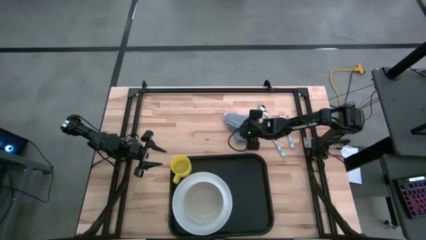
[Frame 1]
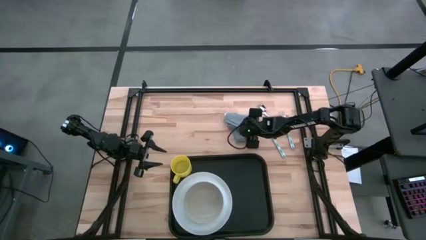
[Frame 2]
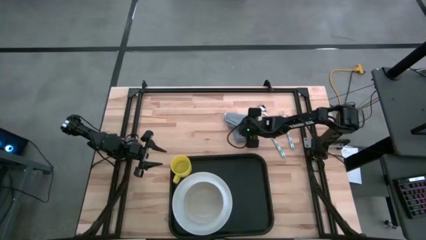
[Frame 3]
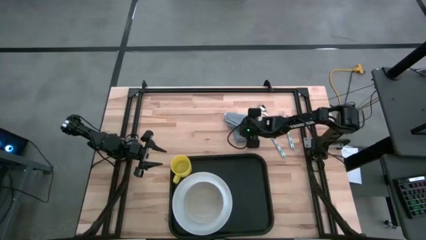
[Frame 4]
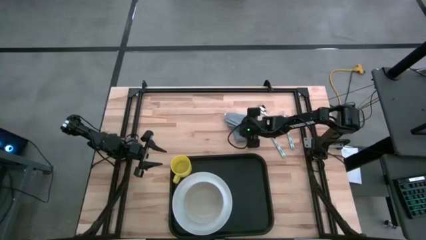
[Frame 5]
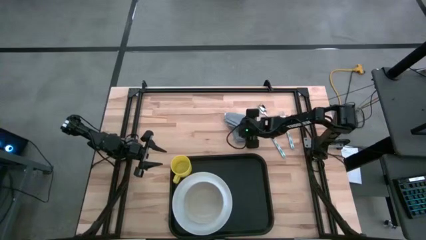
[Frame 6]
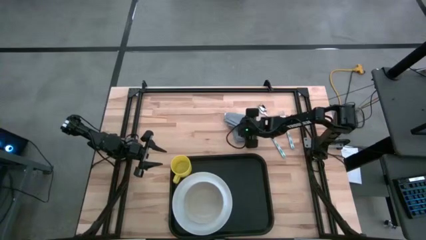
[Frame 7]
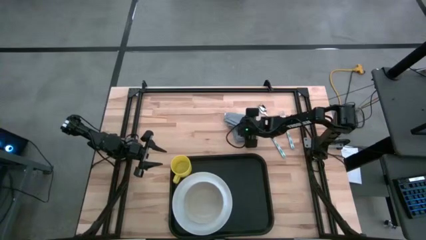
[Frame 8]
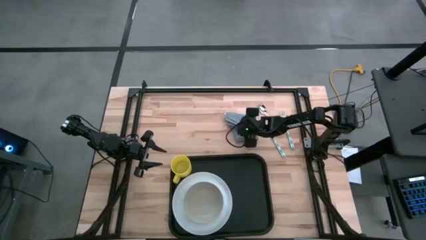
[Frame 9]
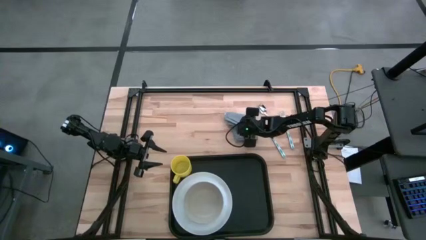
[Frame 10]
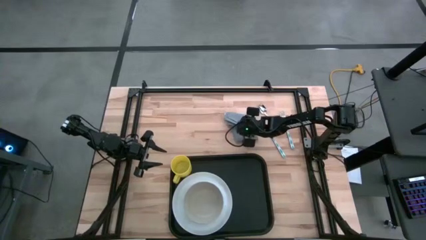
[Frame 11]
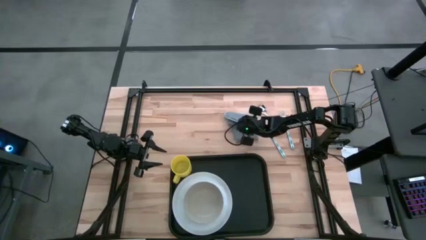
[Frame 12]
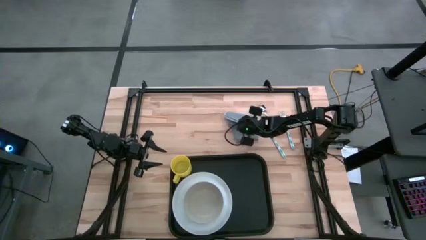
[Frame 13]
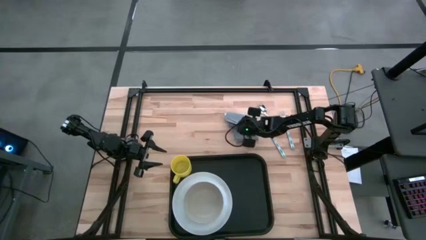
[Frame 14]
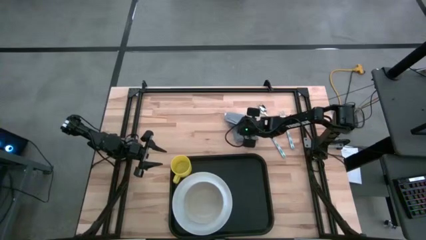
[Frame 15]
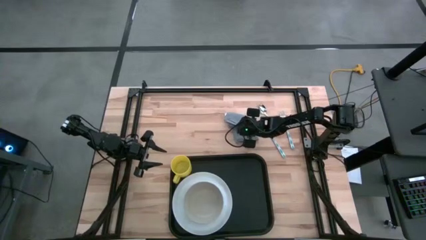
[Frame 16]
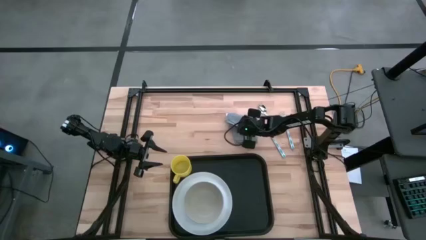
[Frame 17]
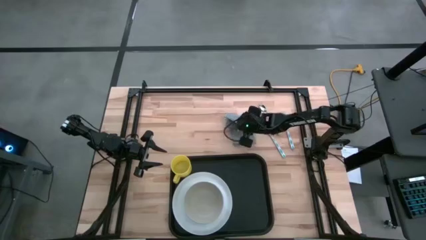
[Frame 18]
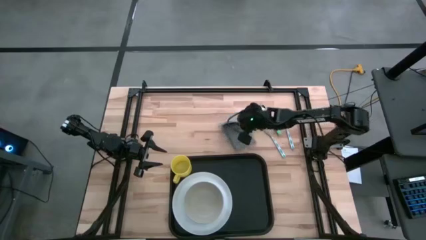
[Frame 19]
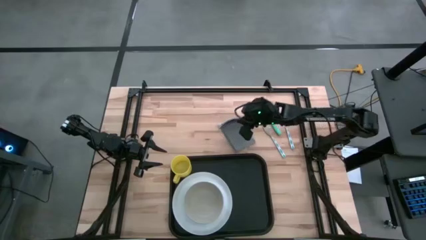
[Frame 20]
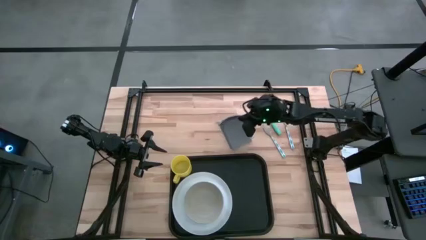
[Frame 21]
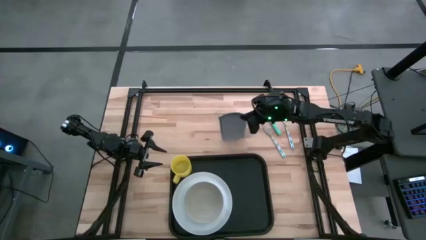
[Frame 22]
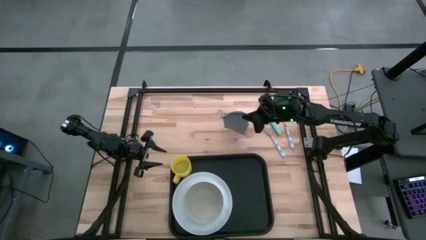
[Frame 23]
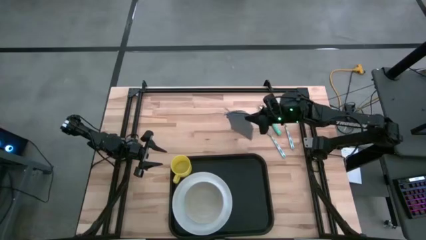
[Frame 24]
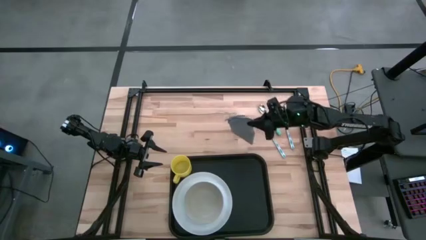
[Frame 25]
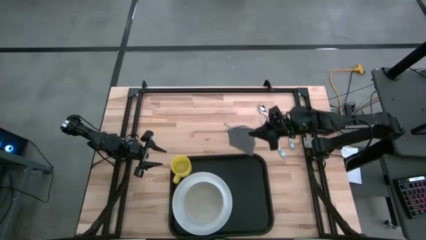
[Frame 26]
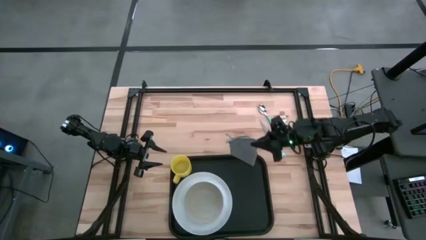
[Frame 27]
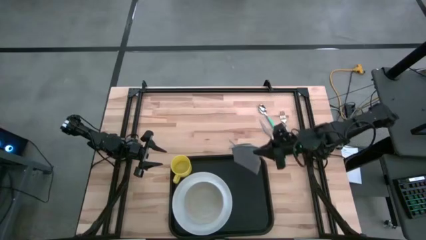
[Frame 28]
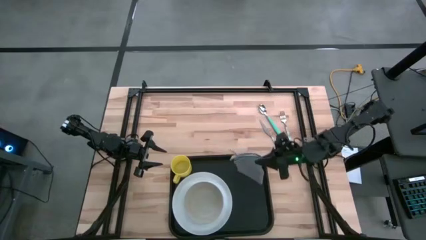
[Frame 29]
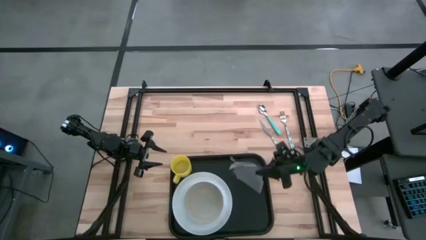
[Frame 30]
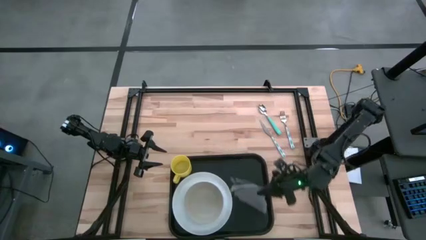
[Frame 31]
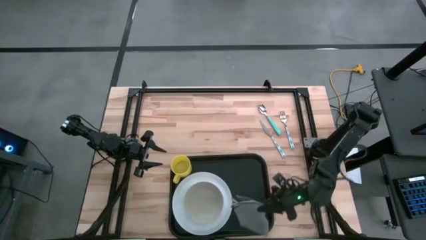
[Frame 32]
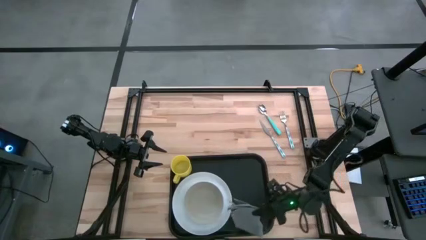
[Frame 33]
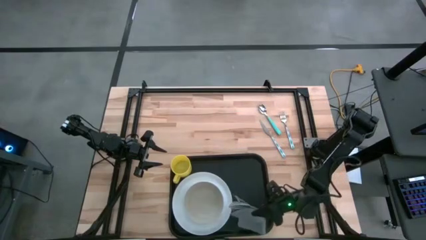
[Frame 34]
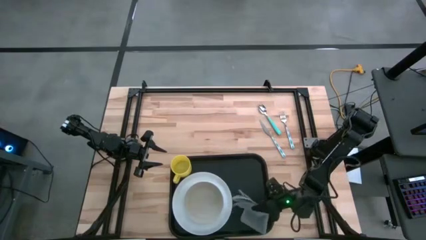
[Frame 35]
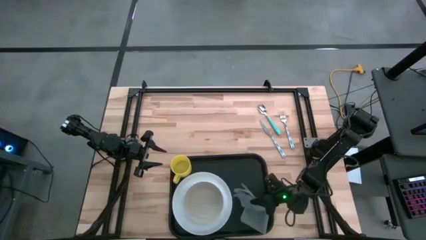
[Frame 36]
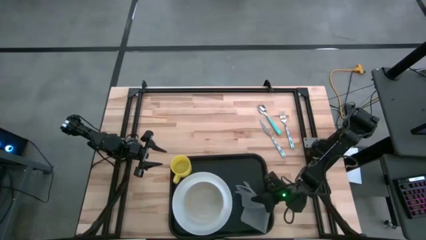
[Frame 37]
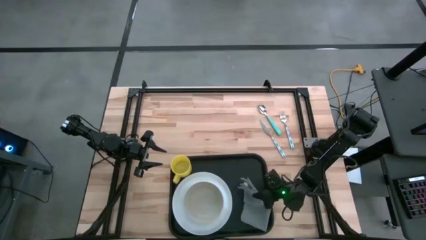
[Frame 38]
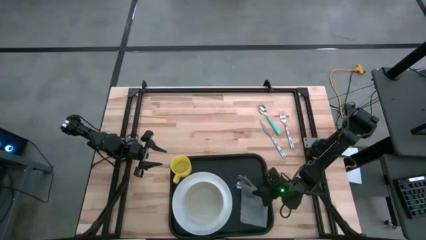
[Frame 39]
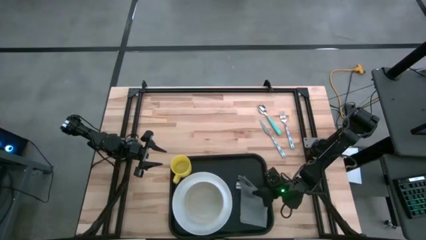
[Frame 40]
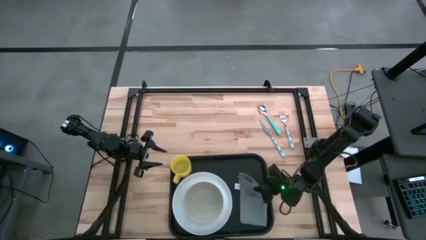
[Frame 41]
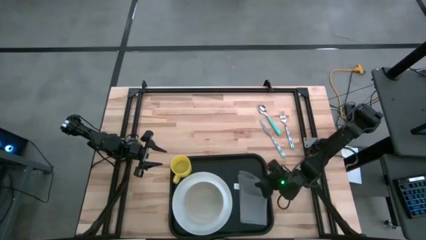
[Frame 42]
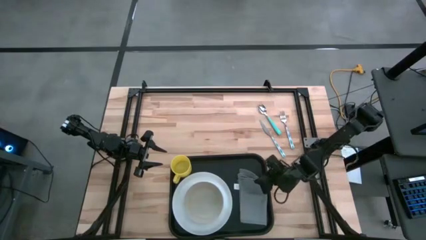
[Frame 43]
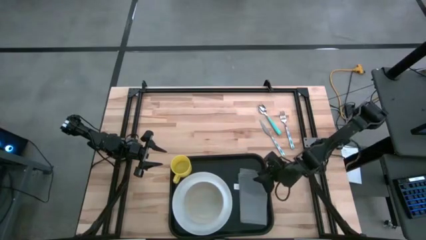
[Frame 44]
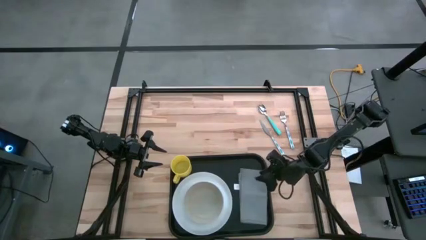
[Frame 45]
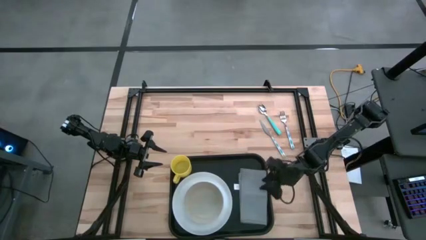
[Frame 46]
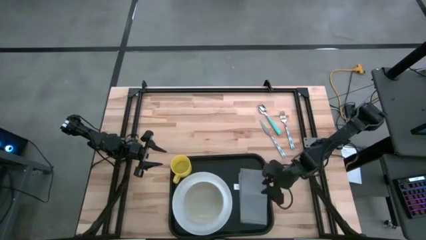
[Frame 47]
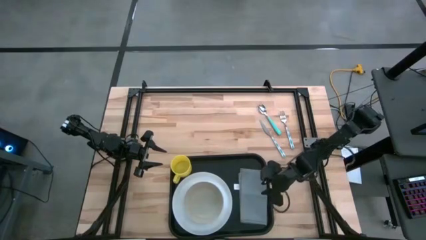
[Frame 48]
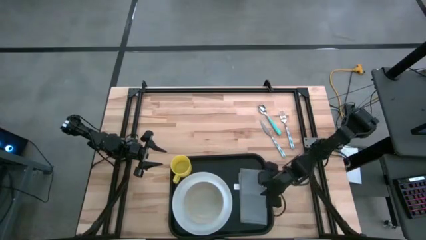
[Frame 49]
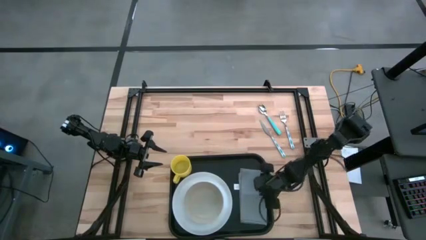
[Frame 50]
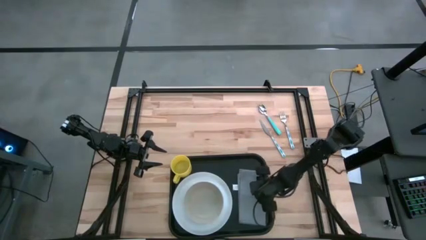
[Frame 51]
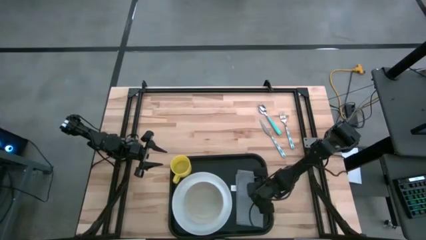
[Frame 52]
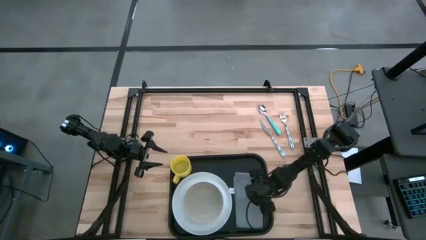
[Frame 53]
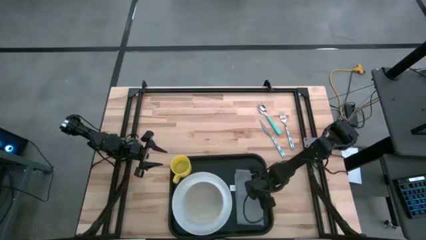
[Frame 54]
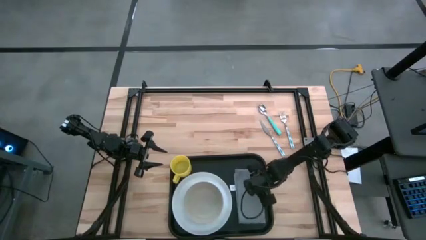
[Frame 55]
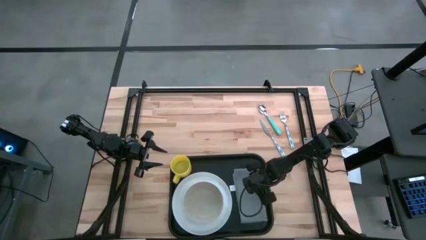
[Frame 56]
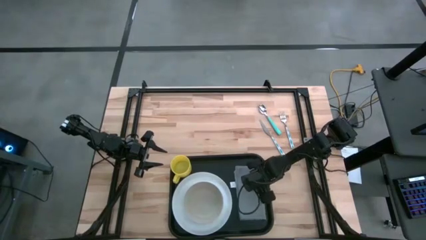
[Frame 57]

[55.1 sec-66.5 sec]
Task: Set up tray
Put the gray napkin to the right of the white plate on the black serving tray

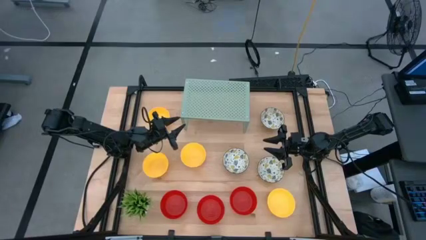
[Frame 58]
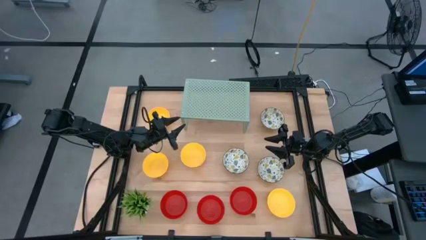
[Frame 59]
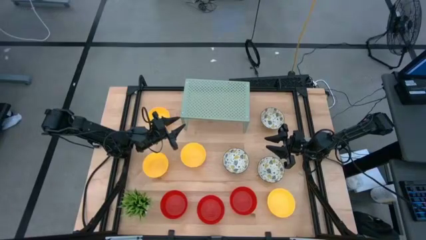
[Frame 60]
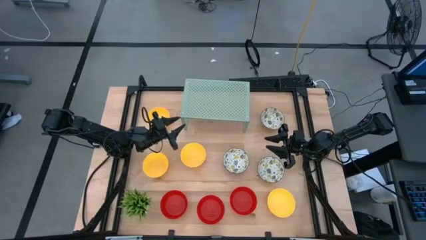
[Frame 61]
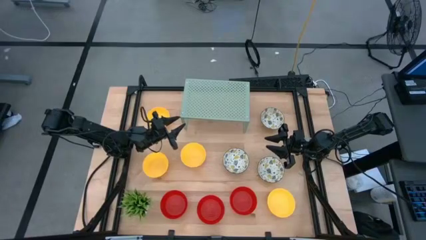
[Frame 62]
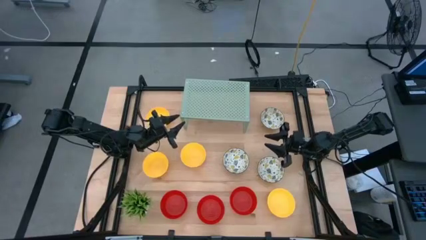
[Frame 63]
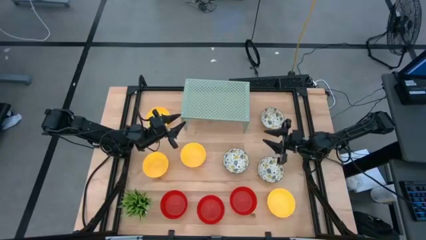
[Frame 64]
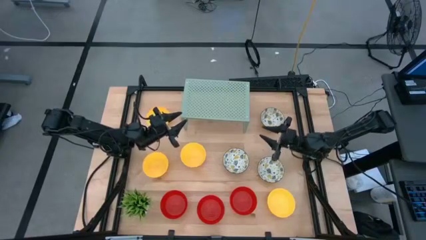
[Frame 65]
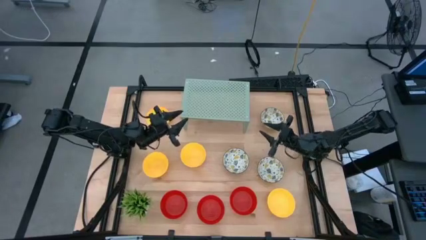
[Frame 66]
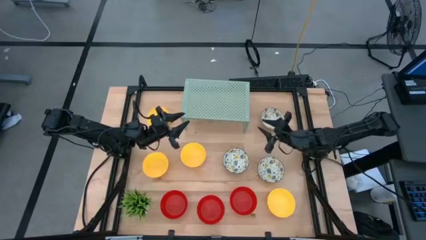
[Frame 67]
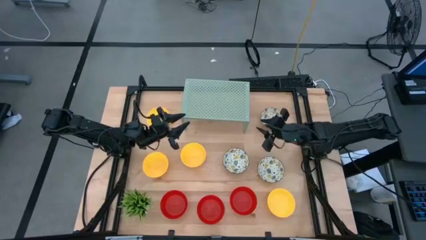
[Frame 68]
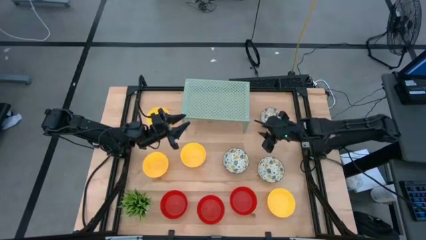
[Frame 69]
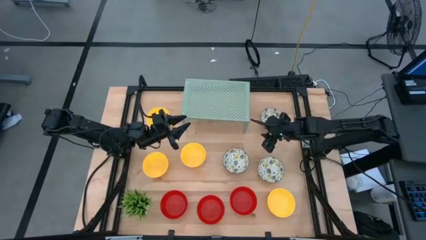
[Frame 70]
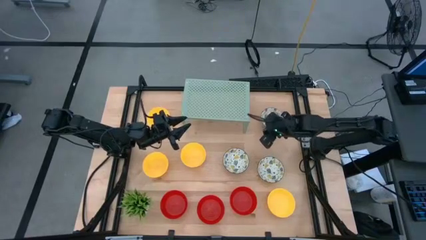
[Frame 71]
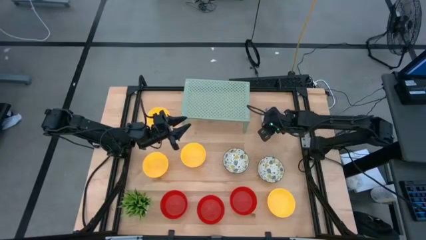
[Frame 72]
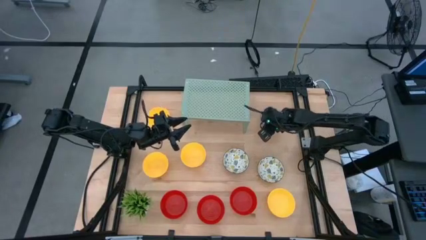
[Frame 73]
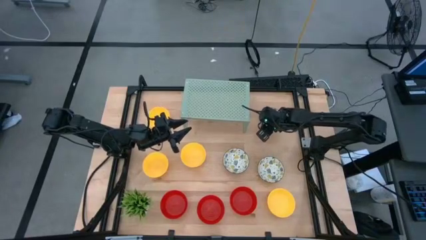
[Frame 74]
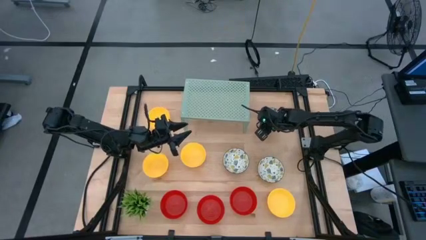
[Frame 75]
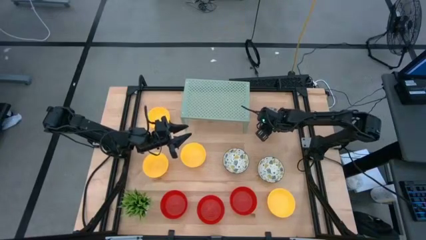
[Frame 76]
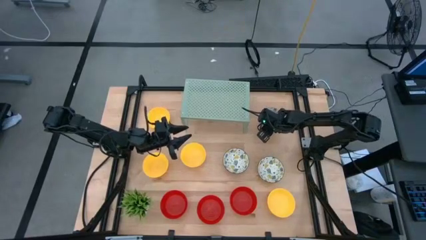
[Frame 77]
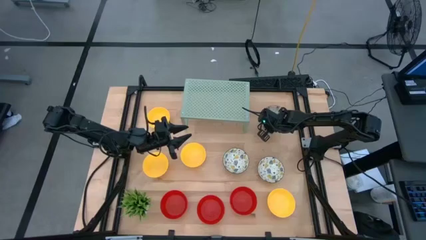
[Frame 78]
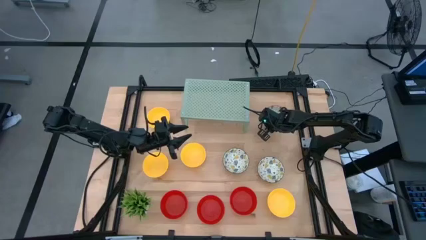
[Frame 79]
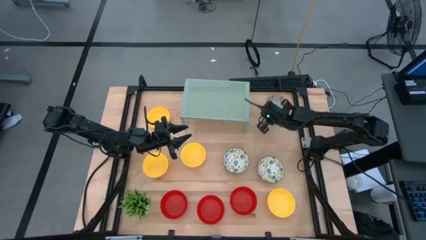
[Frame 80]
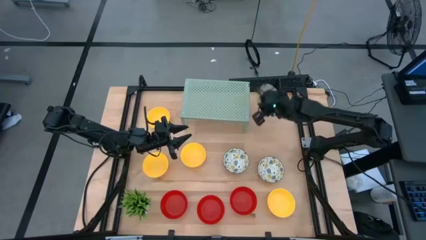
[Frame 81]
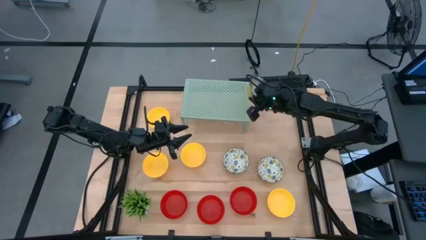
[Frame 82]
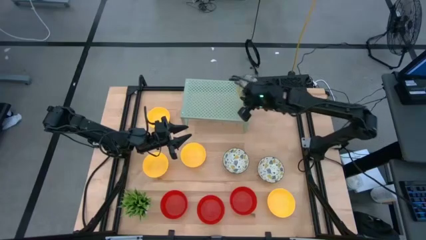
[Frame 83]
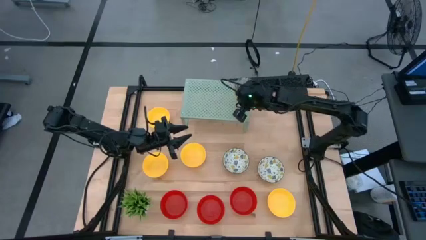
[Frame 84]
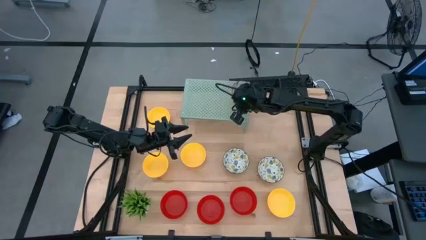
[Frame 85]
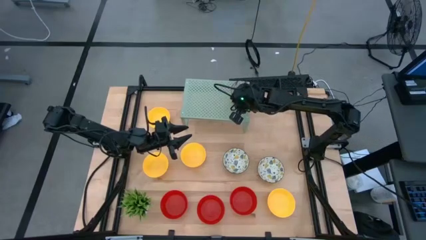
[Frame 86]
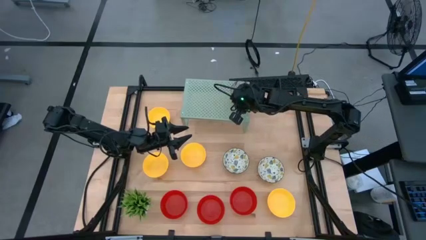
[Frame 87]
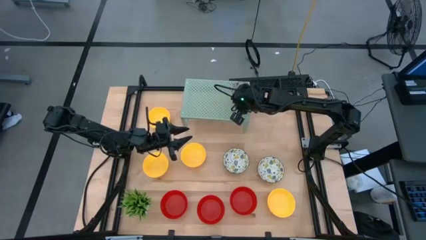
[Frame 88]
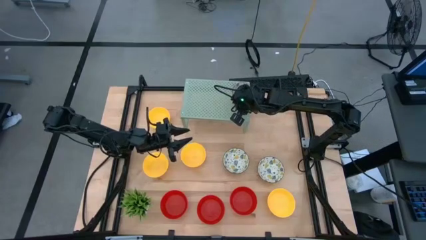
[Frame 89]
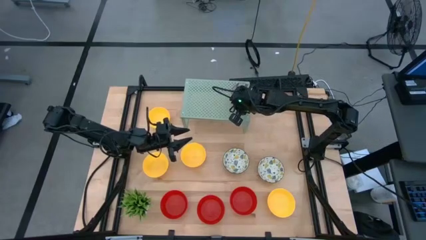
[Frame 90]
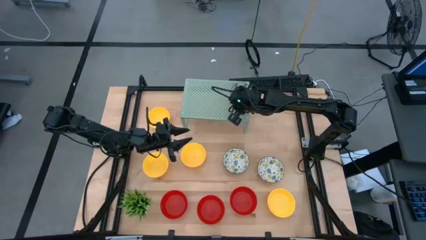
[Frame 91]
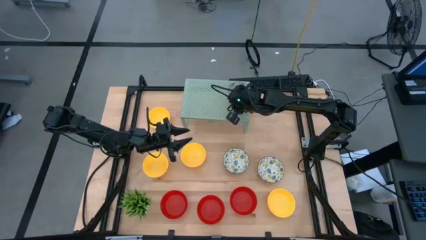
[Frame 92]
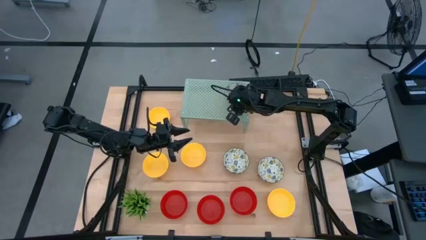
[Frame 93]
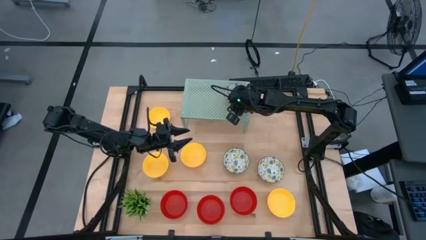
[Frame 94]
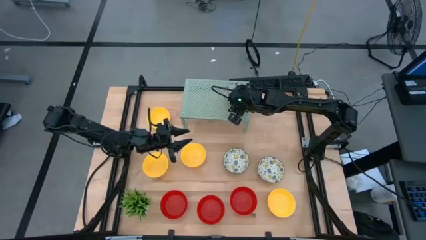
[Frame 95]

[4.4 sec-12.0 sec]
Task: Pick & Place Mini bowls
Put the white patterned bowl on the shelf
